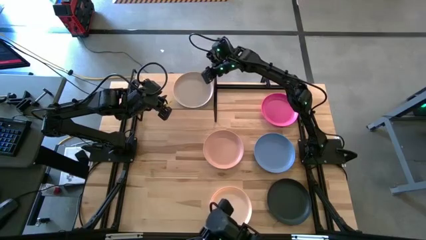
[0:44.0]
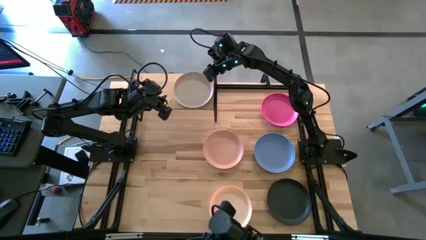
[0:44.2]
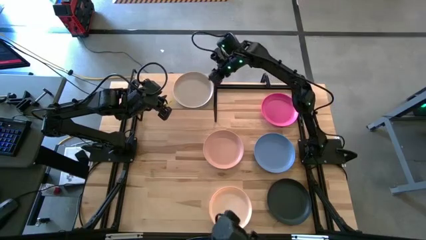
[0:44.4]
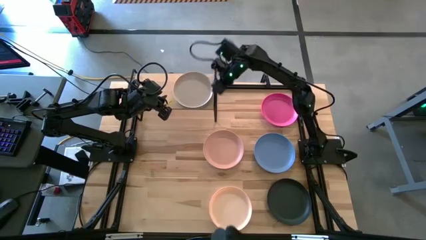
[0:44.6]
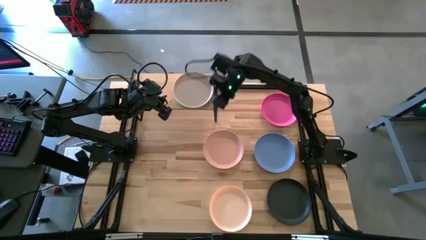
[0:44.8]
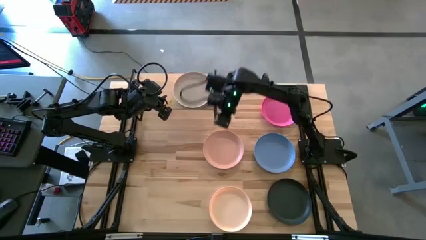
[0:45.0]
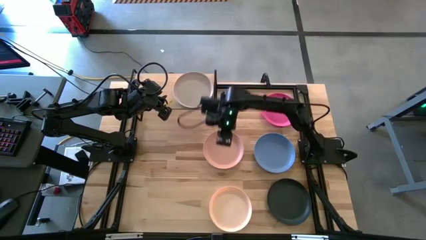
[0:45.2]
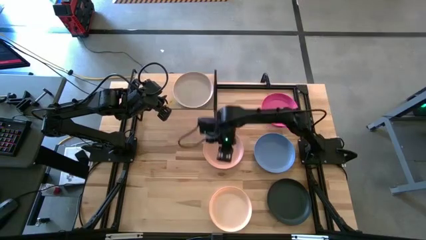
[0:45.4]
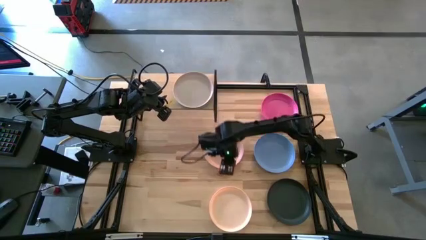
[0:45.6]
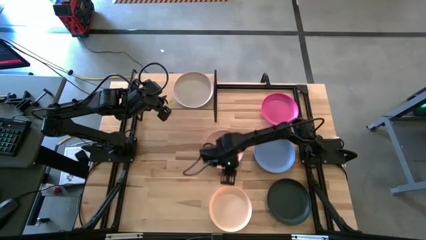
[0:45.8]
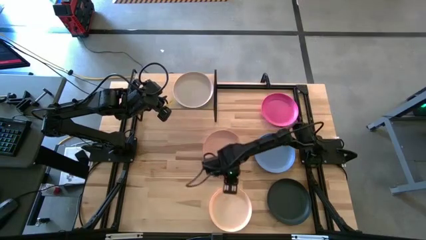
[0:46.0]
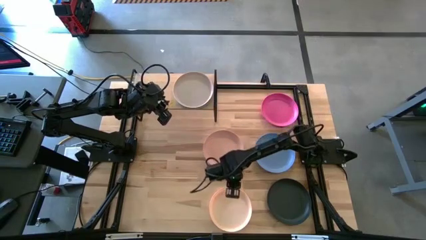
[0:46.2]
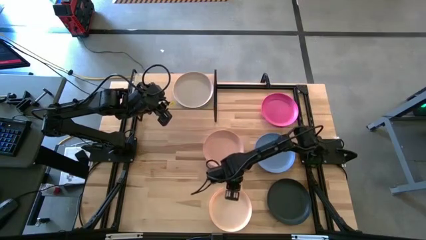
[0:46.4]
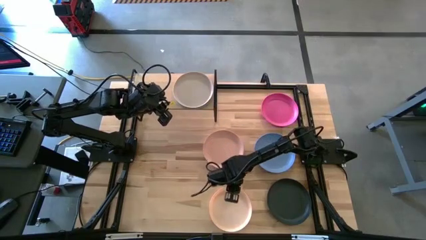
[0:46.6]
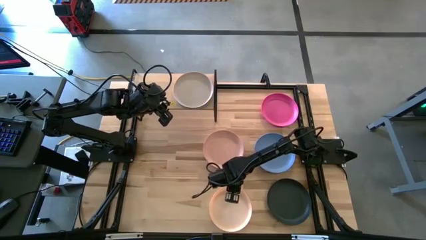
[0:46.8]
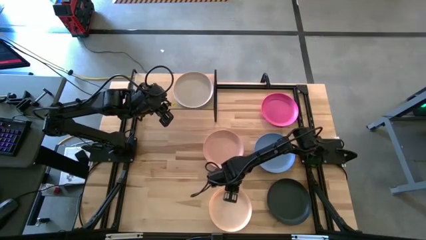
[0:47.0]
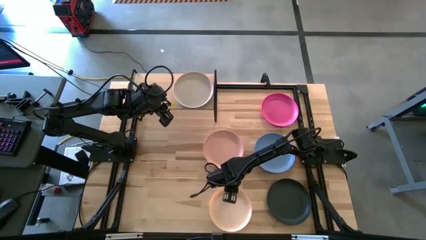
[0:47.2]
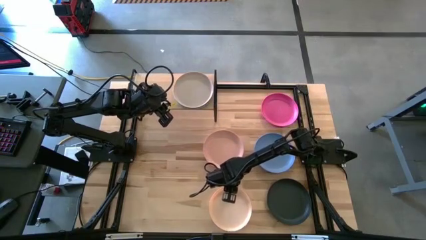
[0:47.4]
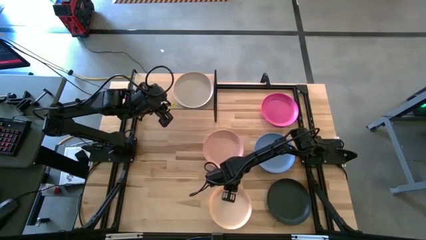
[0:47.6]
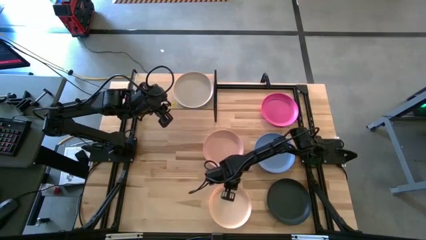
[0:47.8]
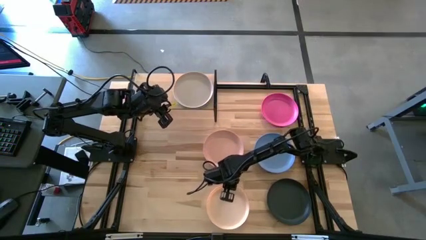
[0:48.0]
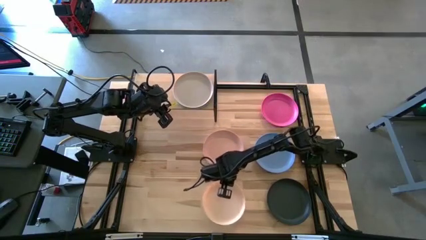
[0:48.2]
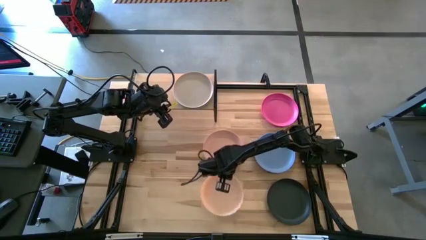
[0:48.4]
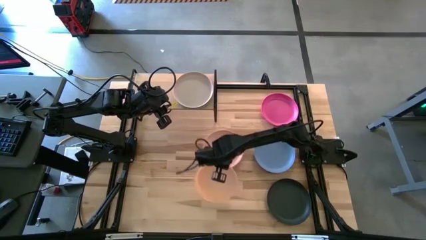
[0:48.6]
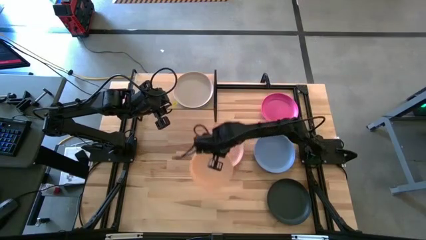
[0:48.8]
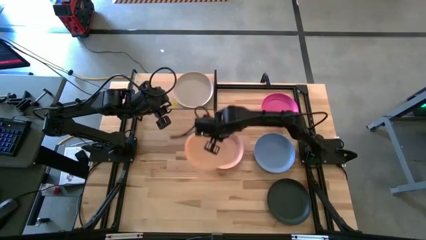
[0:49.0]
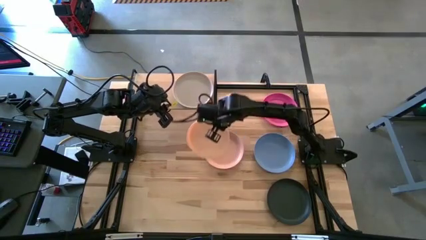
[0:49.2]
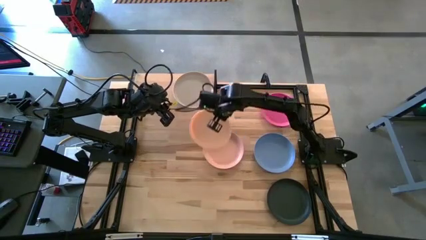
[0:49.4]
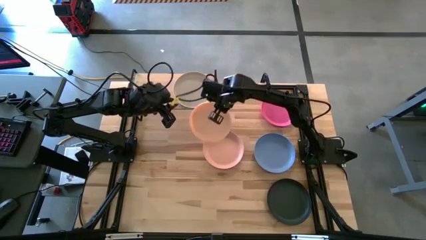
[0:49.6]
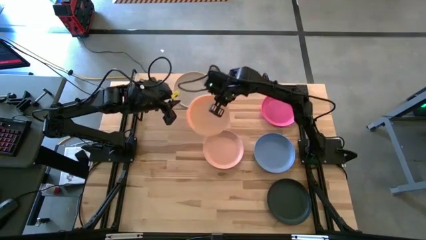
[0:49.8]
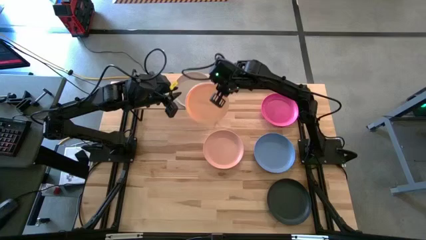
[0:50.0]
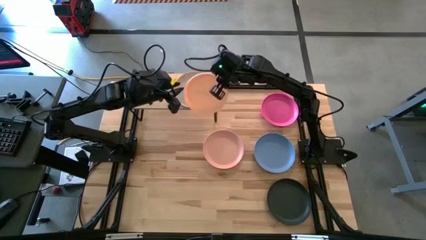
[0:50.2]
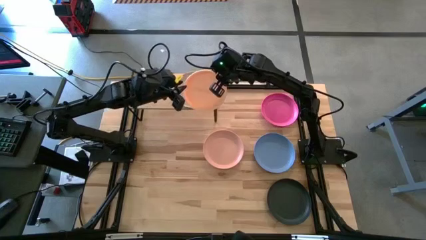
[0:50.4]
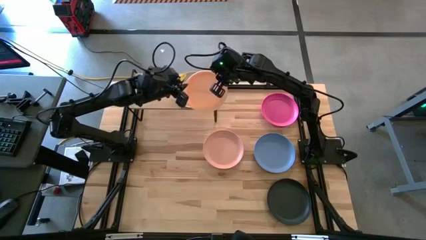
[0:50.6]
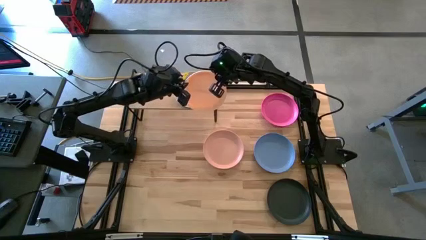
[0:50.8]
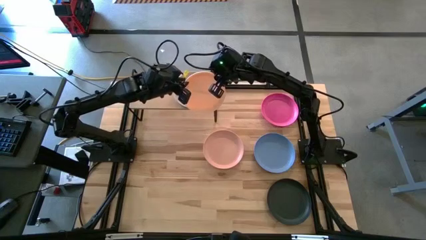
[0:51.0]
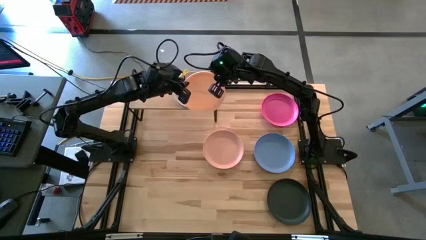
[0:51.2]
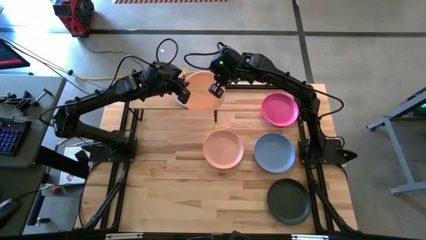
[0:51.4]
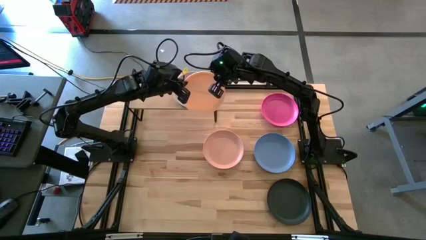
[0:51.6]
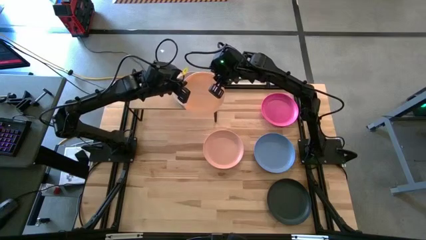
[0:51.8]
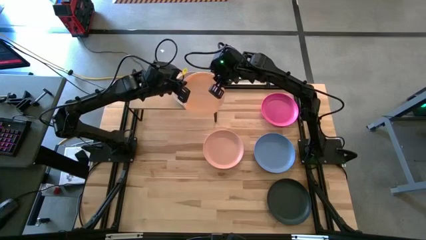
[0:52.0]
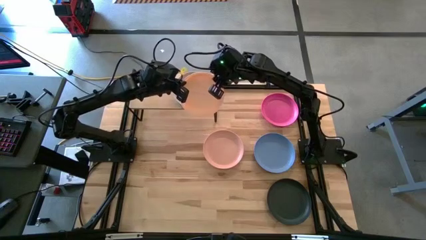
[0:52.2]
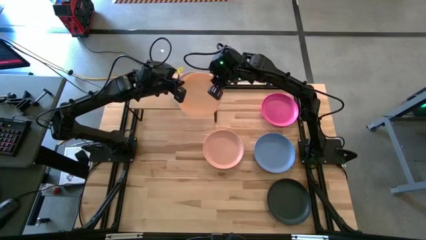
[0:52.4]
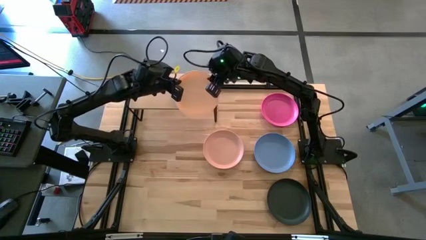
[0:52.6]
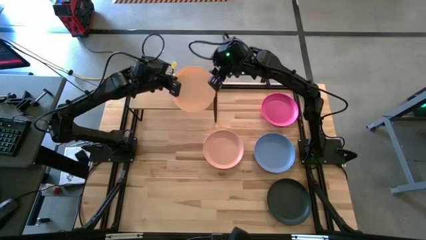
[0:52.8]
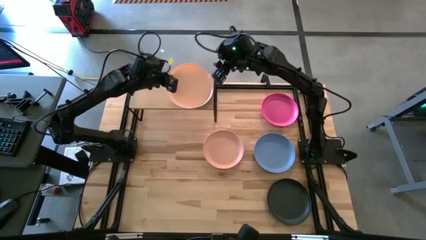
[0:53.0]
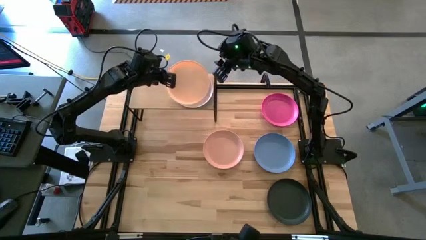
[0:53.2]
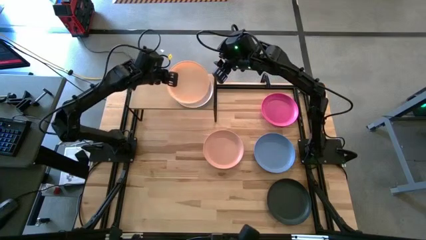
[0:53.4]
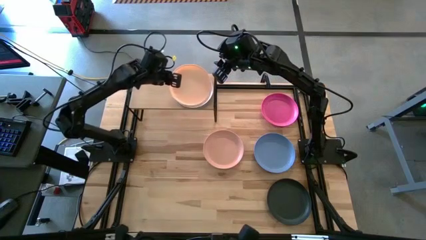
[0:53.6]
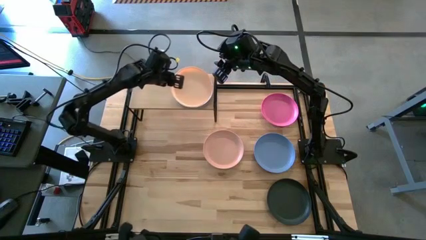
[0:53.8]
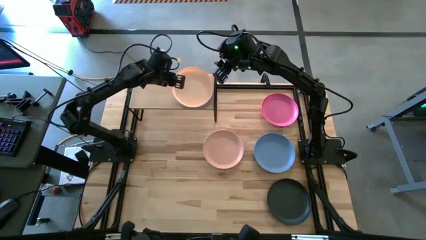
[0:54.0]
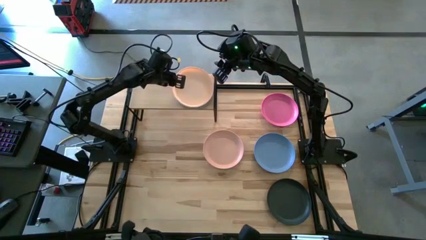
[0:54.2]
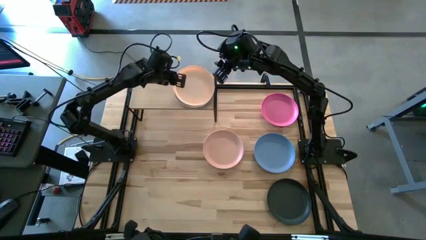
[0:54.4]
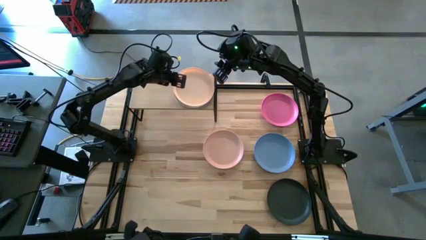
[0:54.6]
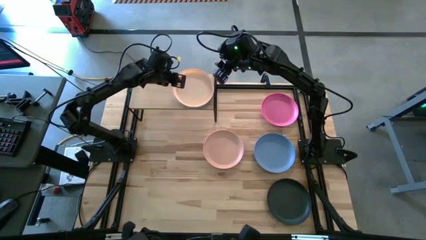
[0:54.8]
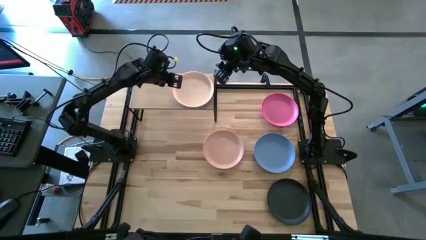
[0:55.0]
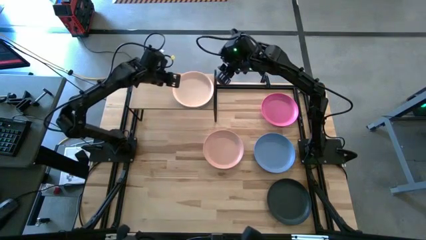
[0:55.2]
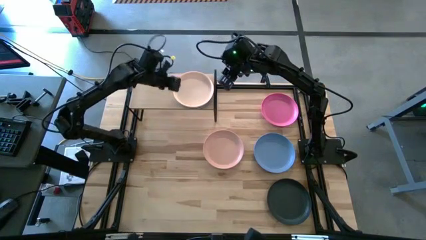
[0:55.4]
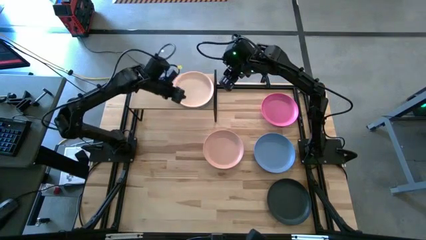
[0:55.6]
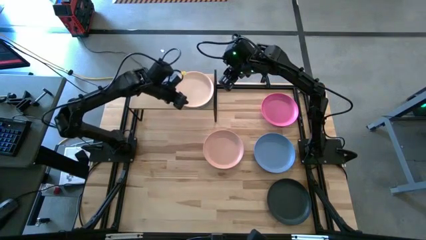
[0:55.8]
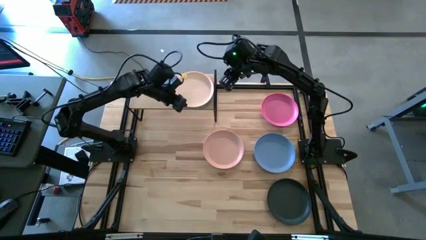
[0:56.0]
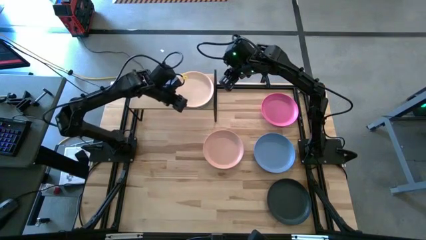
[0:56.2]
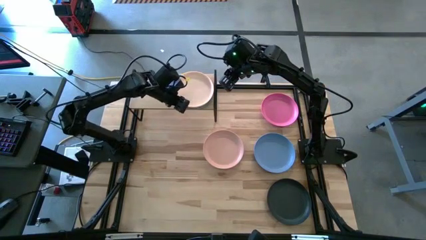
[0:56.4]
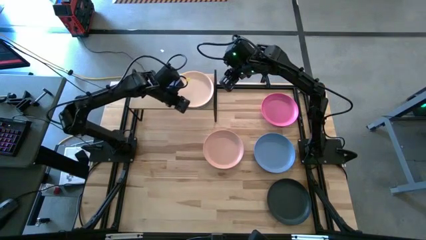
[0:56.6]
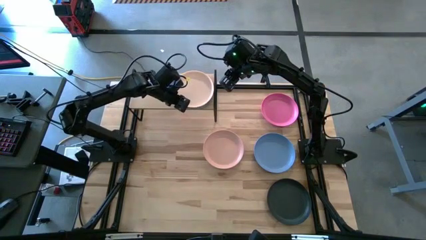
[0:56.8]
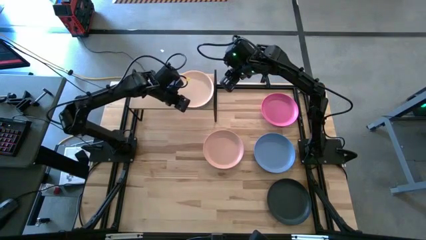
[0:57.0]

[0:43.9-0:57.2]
Task: Place and stack plates onto a shelf
Stack the white plate on top of the gray plate on the shelf
